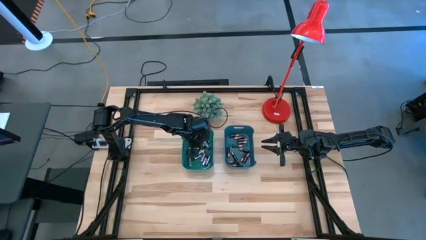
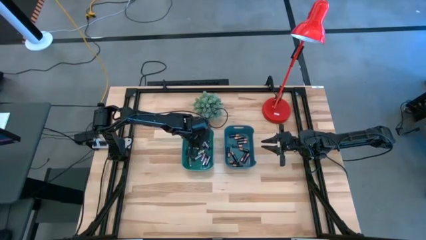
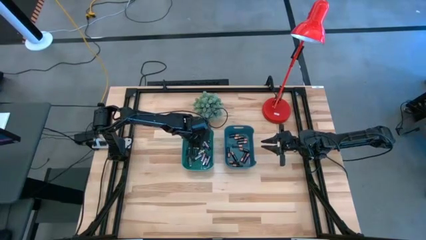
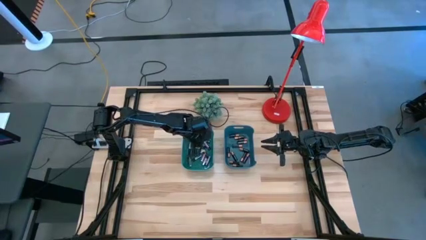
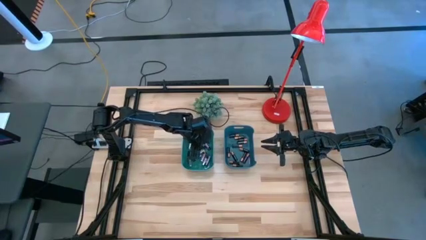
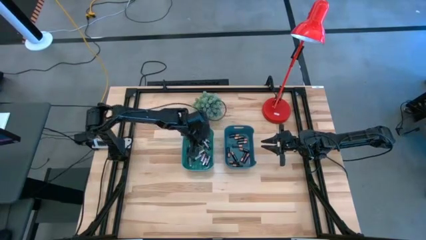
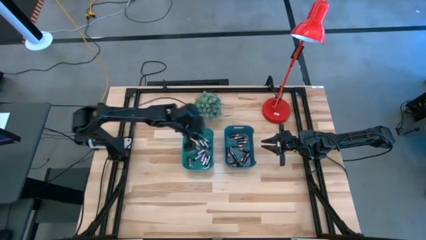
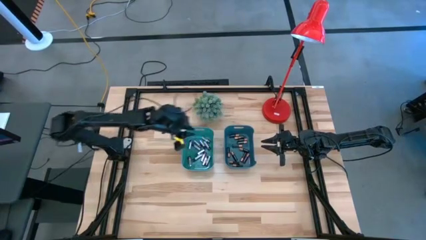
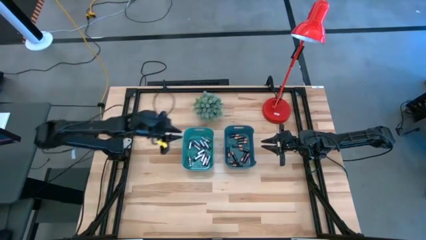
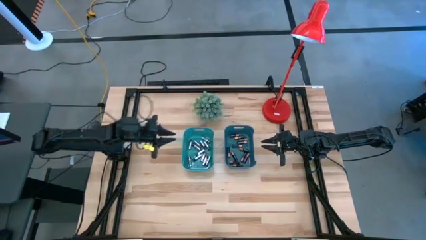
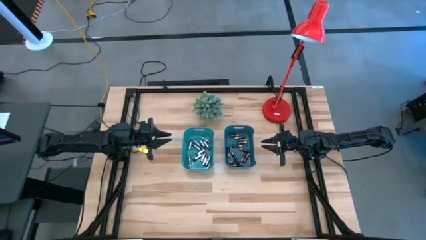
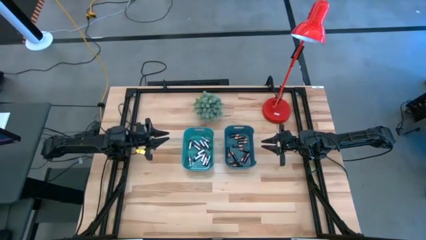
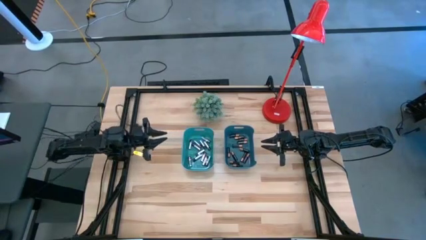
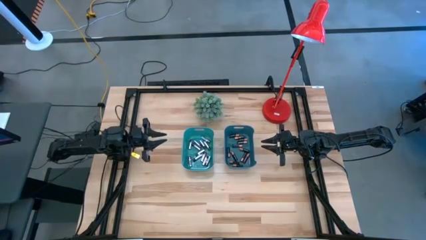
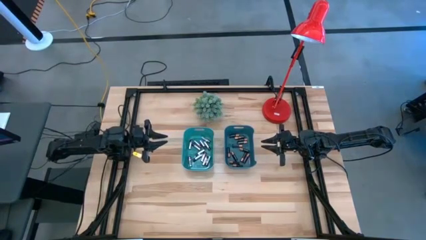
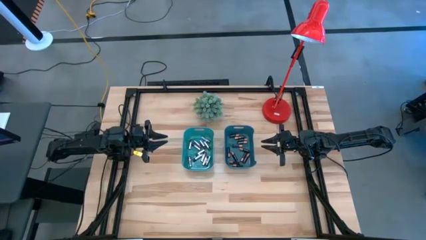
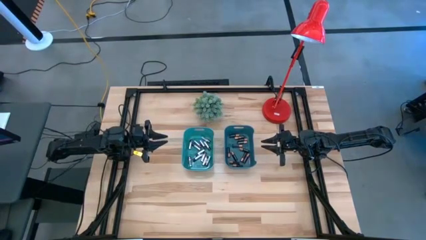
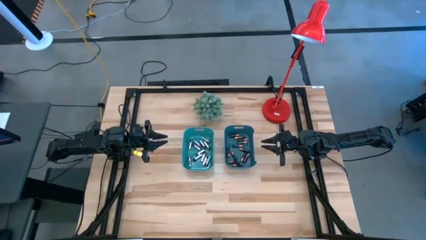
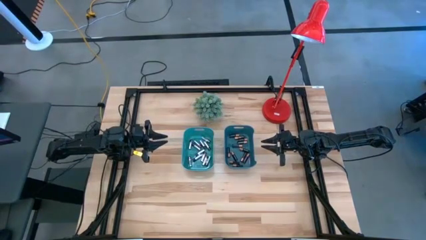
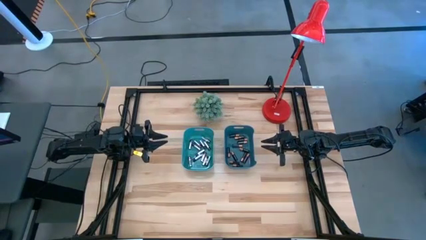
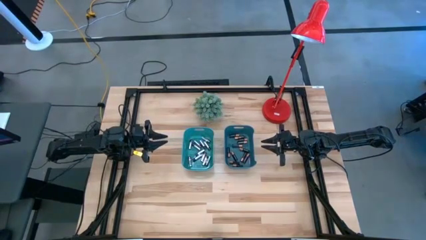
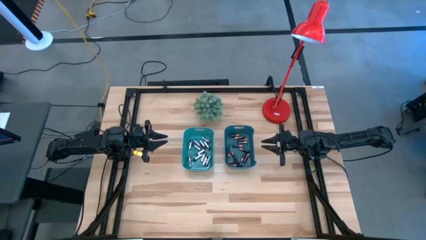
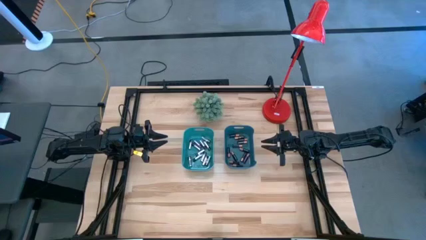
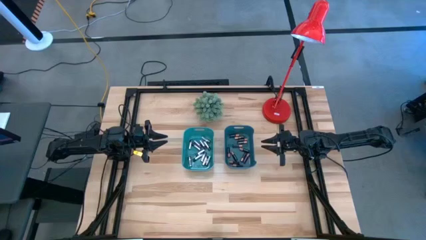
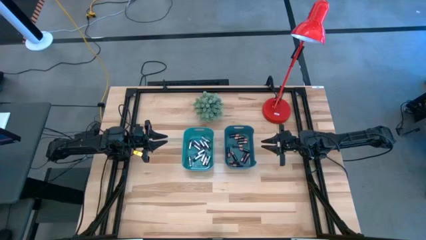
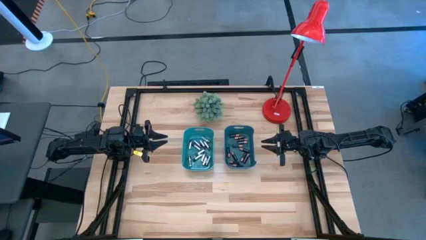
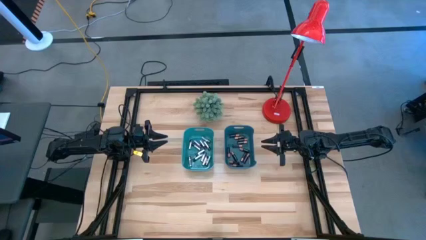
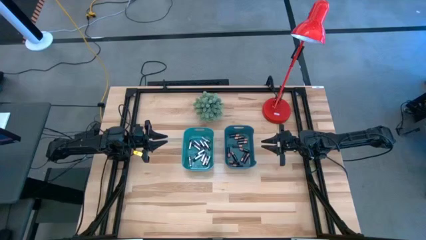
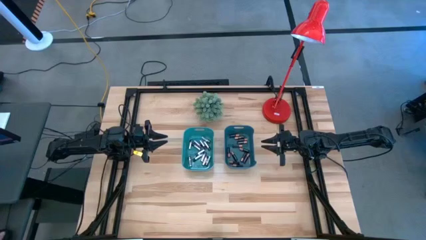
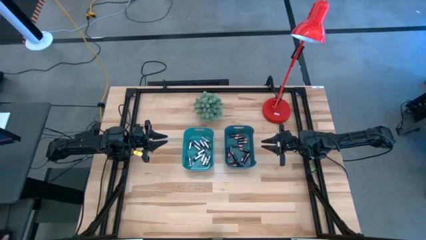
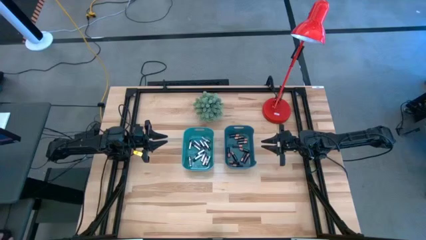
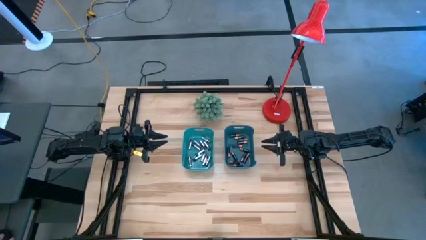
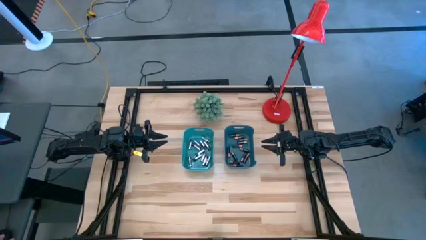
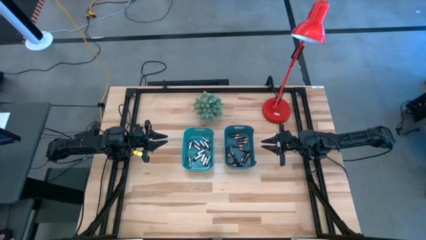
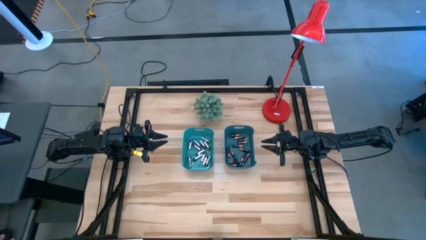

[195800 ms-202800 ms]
Task: Sort batteries
Return to Home Position

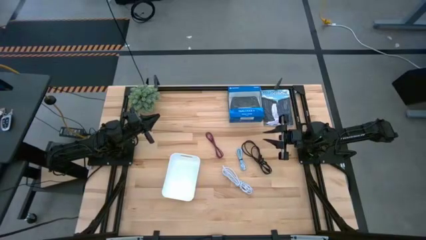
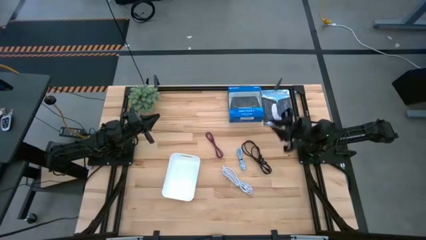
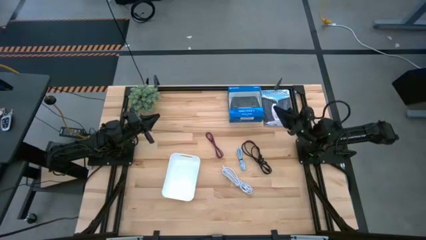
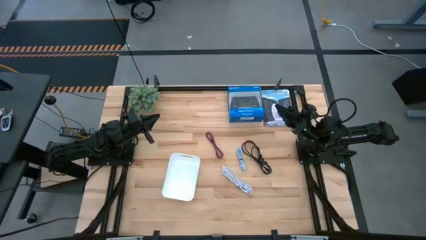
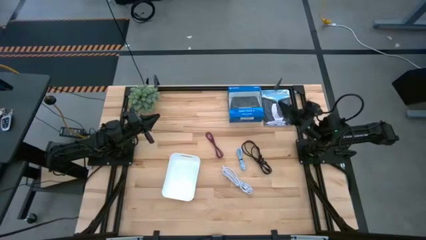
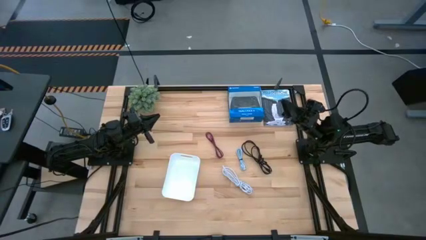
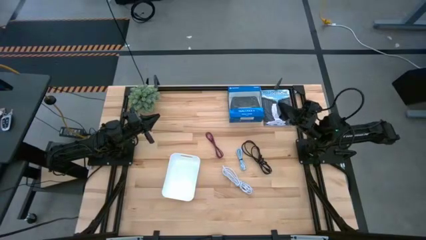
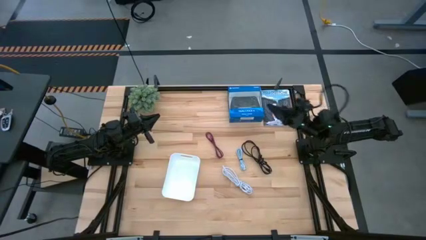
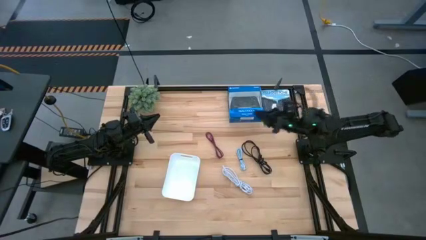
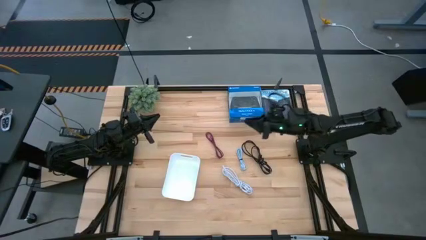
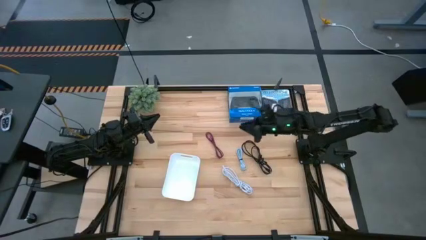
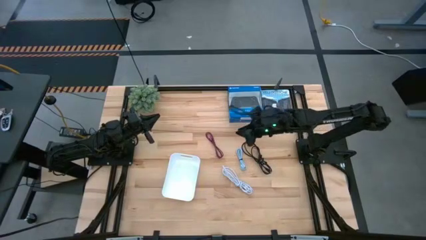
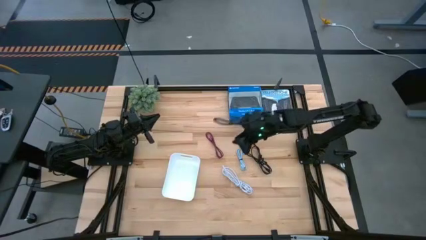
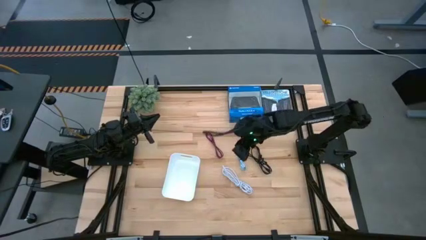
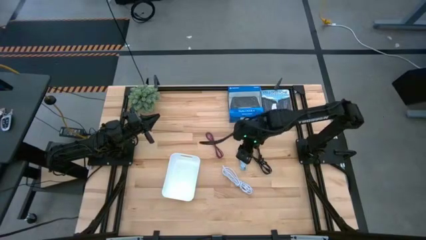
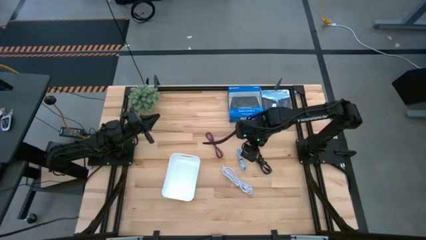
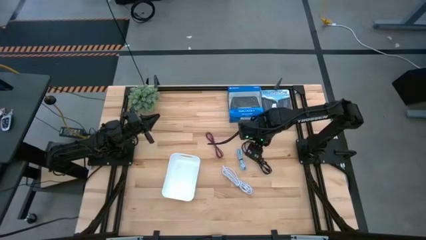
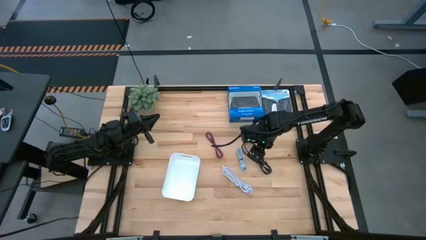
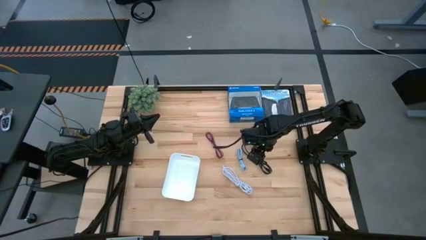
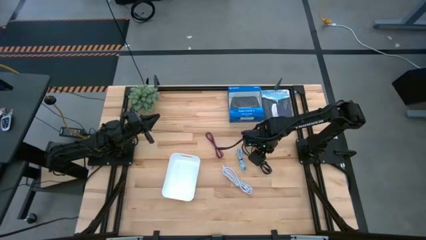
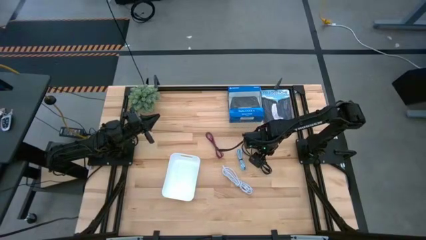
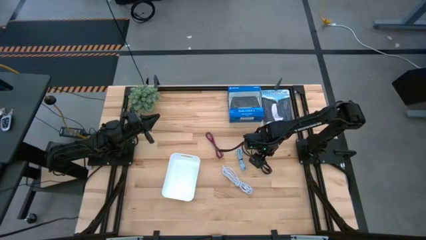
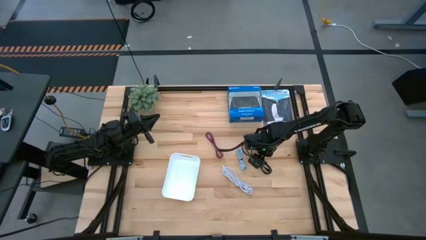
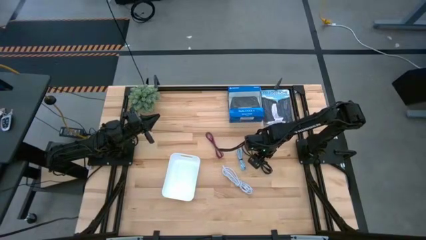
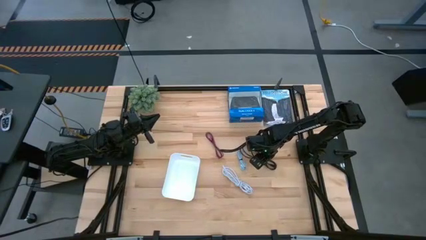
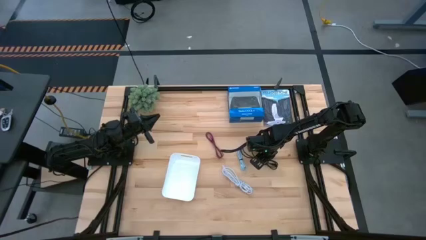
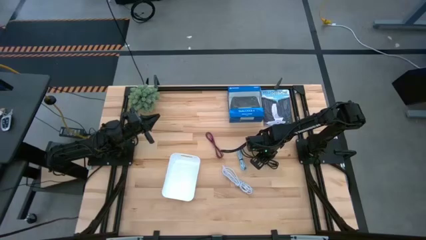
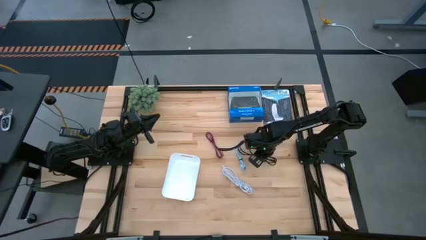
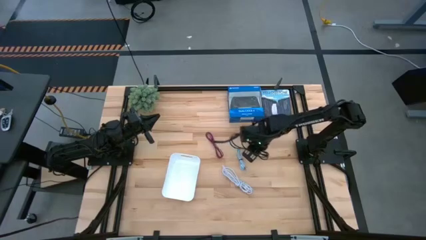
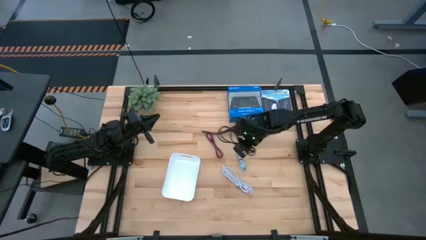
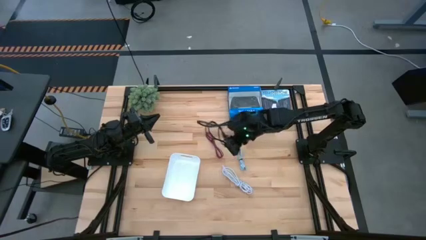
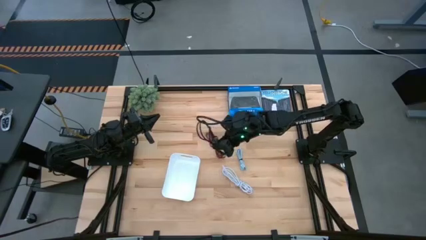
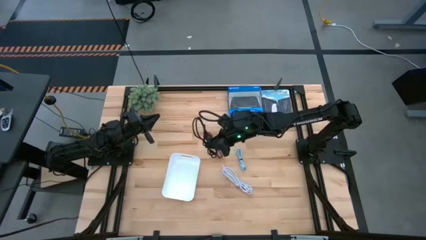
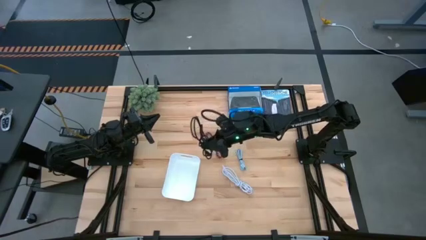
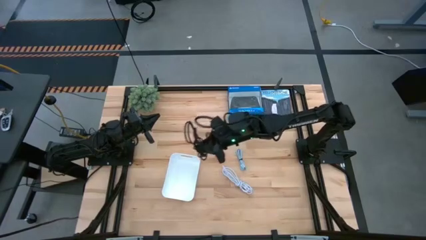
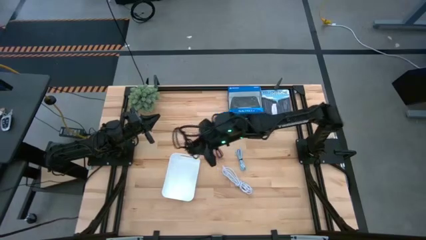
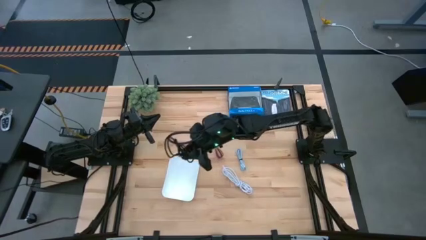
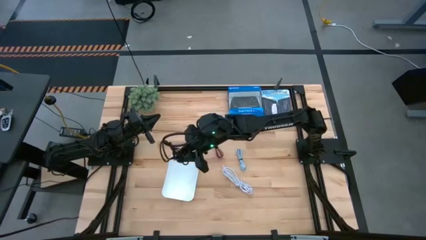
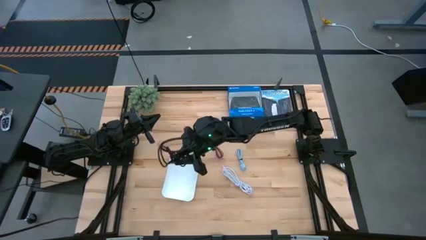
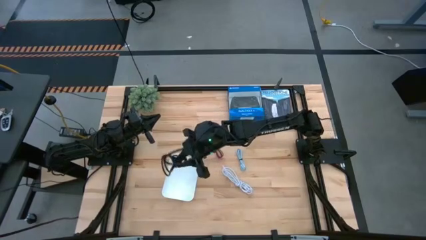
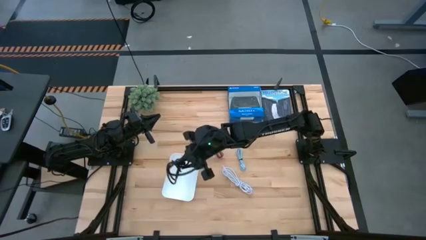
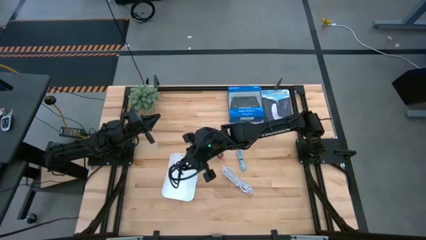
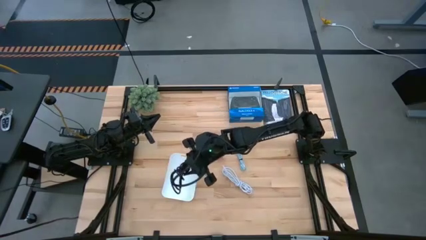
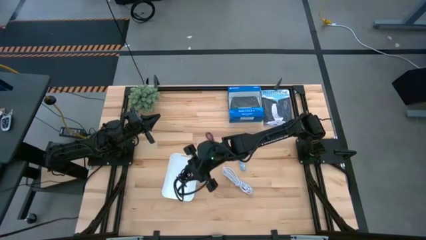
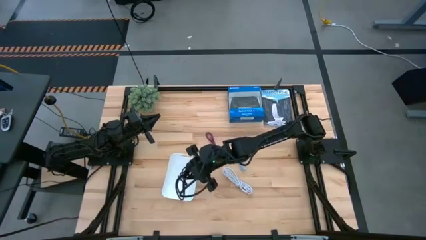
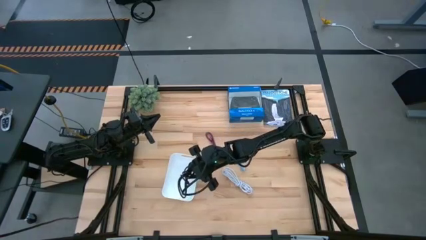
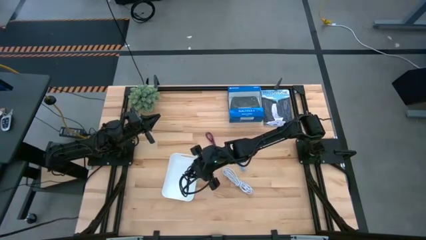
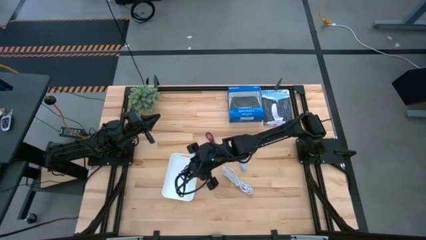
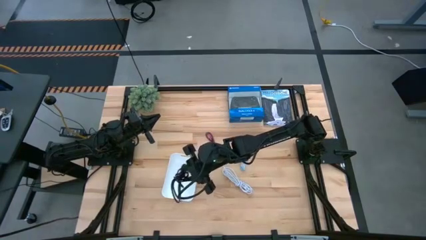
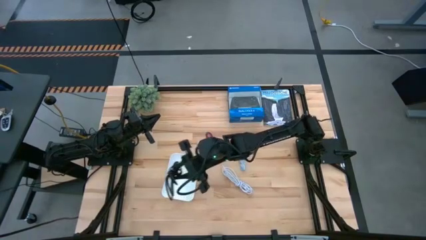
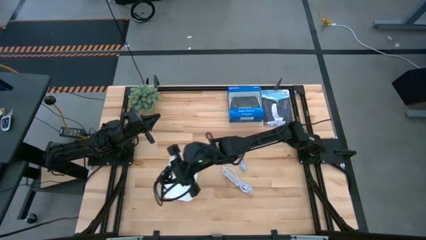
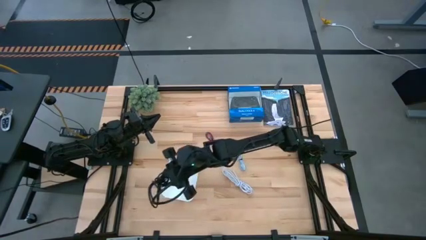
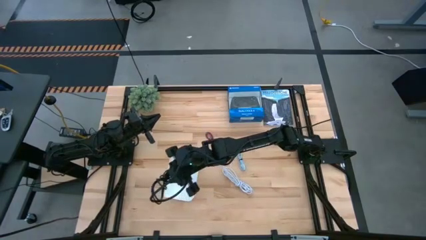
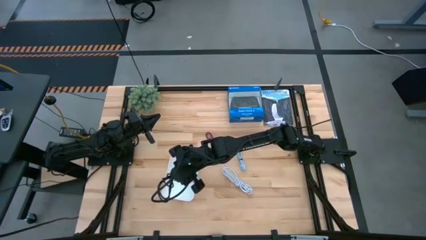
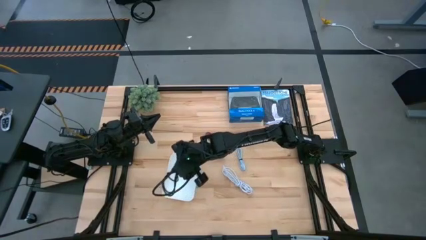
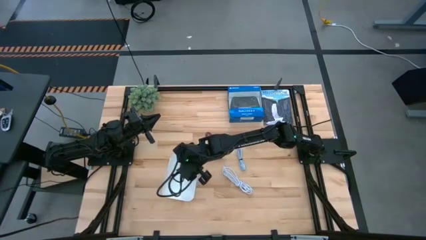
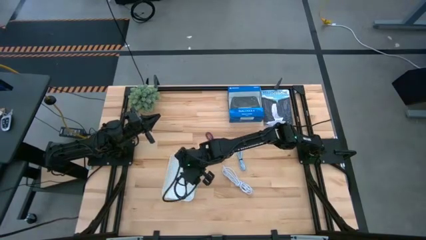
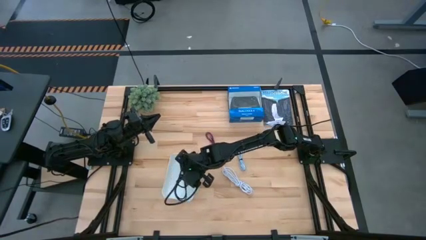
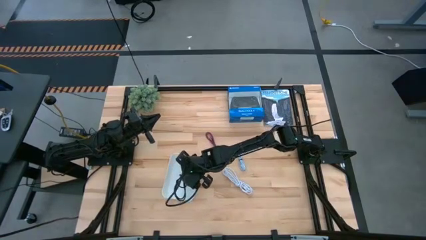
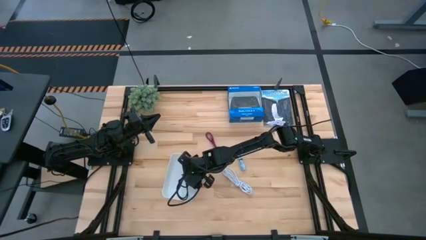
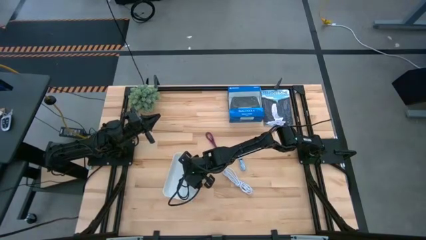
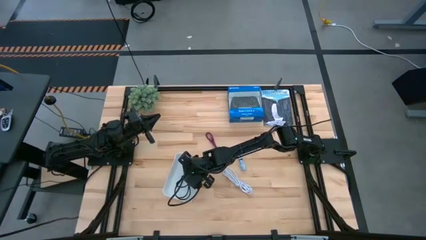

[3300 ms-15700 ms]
Task: Pick and place USB-C Cables
Put the black HDMI cable into the white bin
